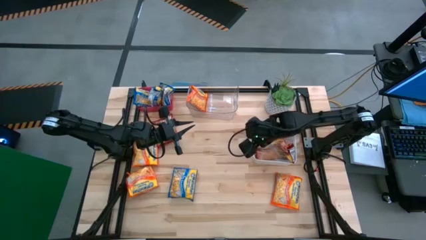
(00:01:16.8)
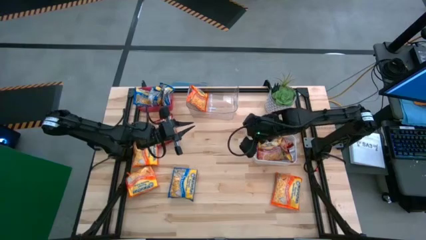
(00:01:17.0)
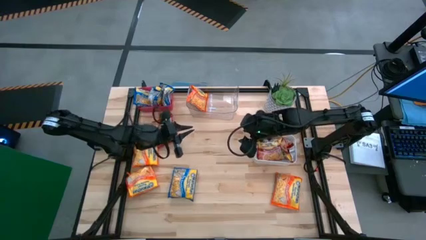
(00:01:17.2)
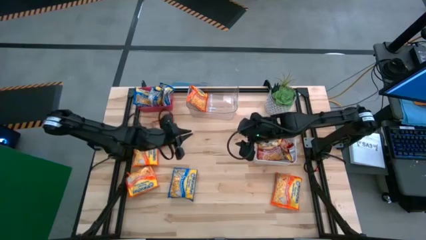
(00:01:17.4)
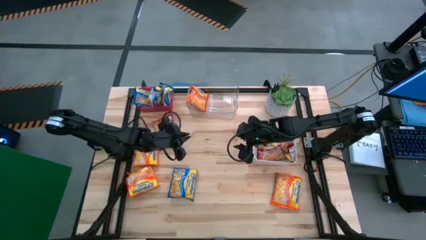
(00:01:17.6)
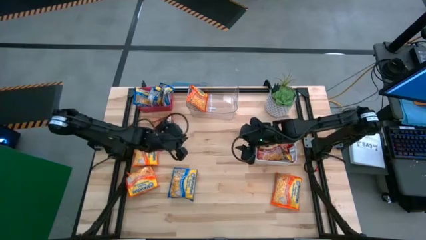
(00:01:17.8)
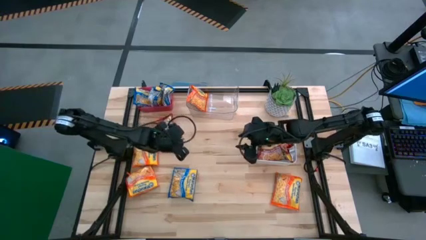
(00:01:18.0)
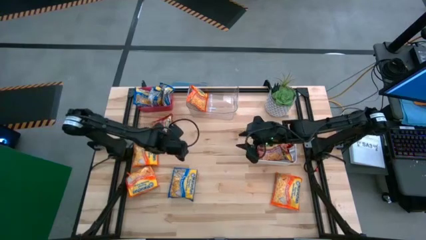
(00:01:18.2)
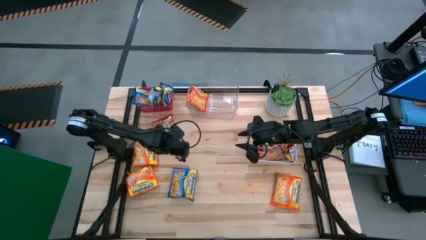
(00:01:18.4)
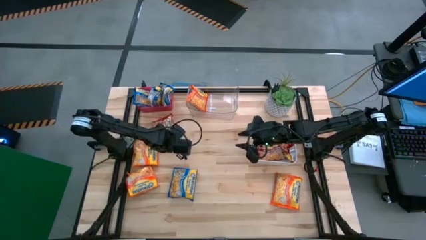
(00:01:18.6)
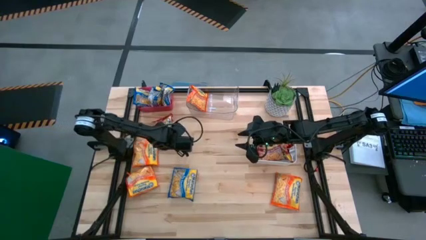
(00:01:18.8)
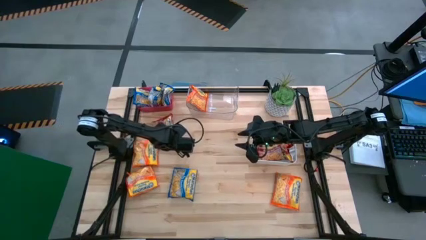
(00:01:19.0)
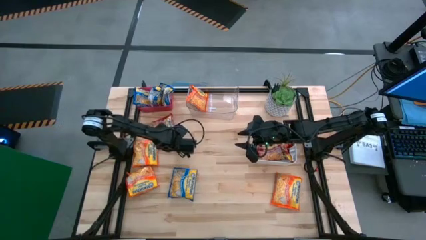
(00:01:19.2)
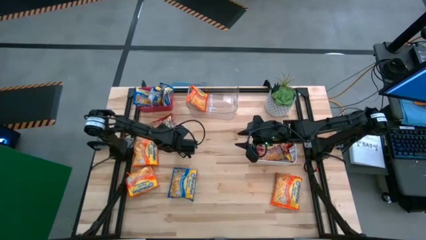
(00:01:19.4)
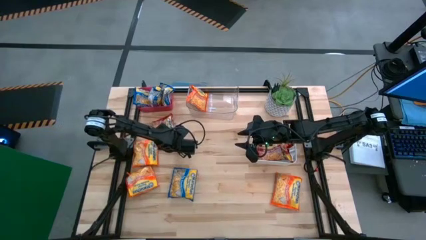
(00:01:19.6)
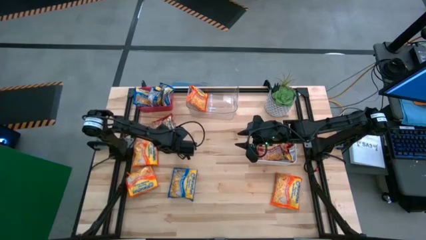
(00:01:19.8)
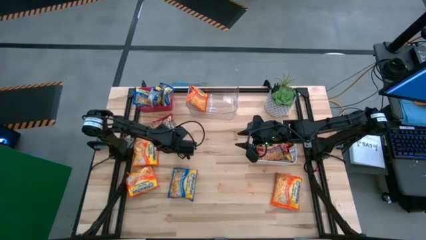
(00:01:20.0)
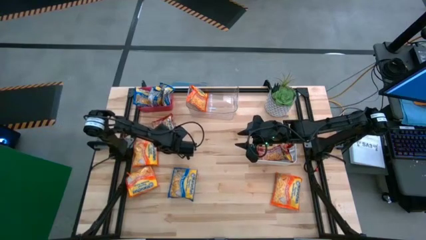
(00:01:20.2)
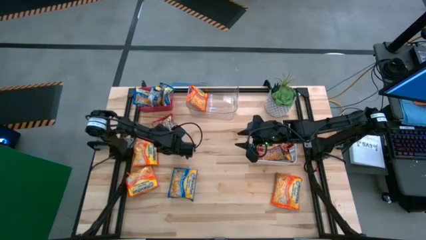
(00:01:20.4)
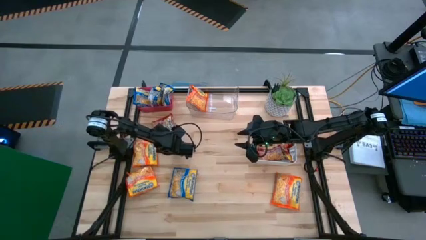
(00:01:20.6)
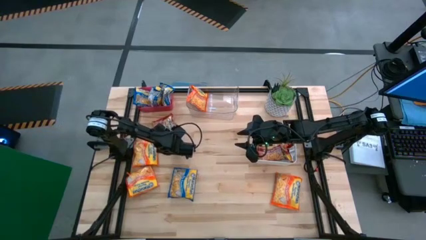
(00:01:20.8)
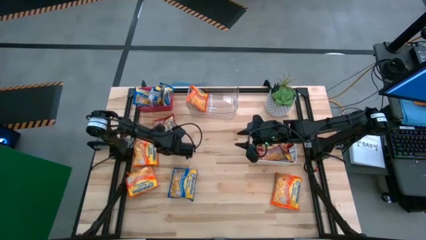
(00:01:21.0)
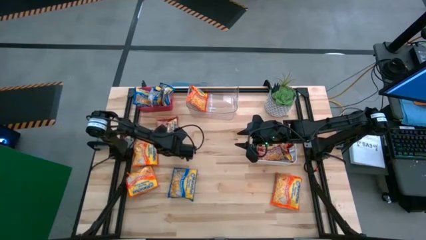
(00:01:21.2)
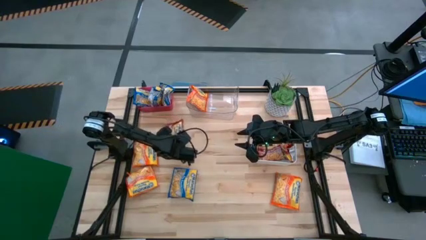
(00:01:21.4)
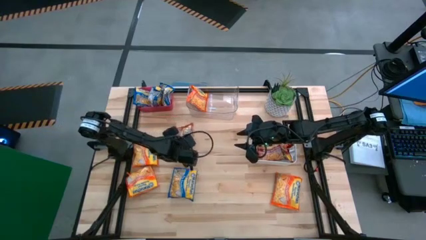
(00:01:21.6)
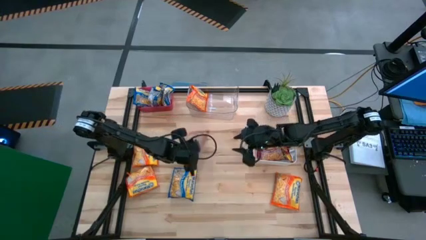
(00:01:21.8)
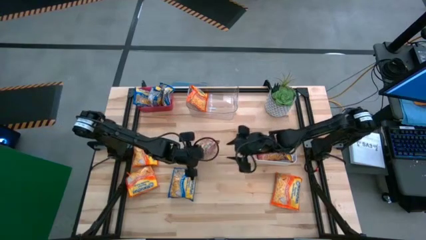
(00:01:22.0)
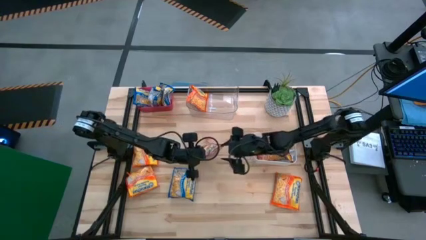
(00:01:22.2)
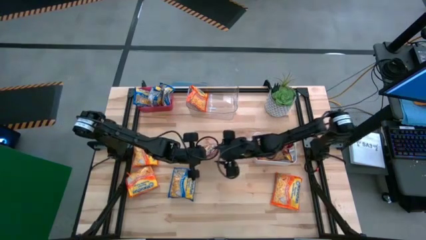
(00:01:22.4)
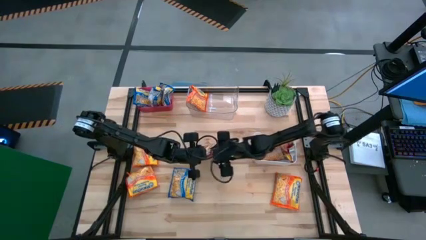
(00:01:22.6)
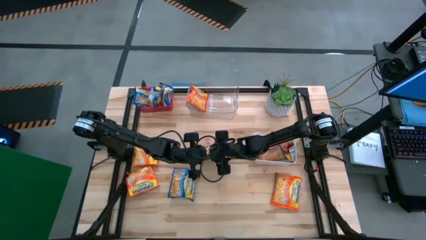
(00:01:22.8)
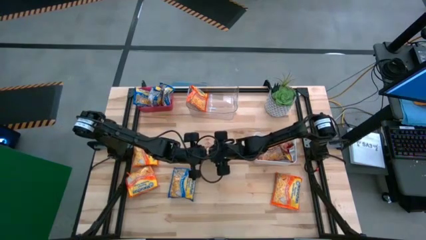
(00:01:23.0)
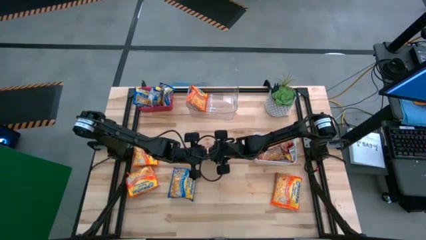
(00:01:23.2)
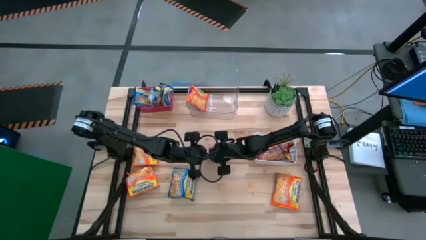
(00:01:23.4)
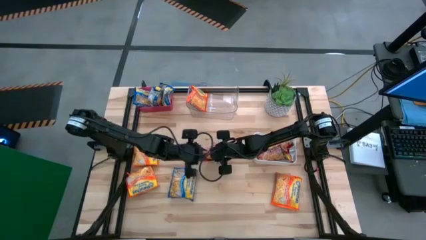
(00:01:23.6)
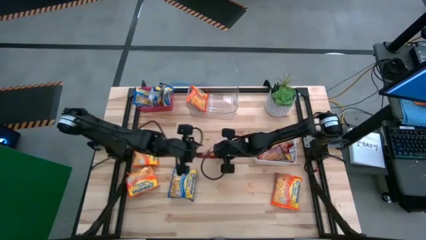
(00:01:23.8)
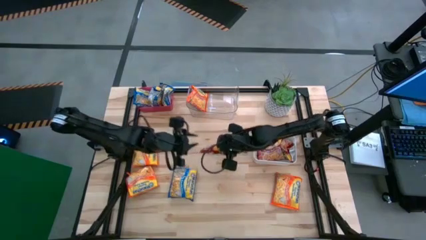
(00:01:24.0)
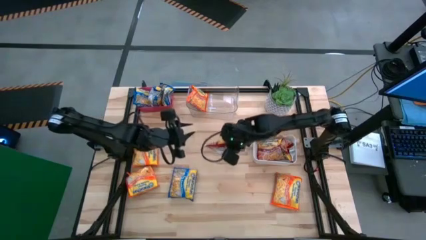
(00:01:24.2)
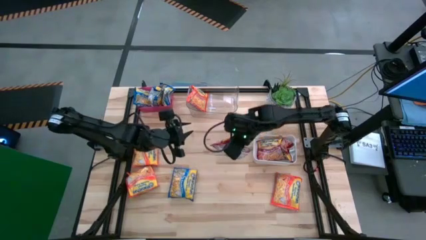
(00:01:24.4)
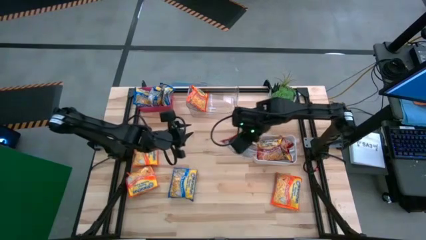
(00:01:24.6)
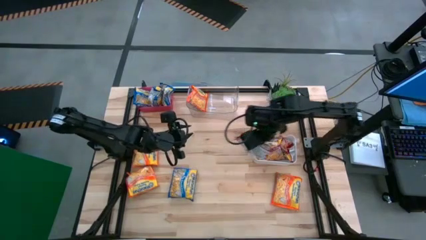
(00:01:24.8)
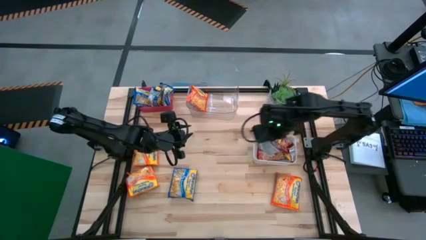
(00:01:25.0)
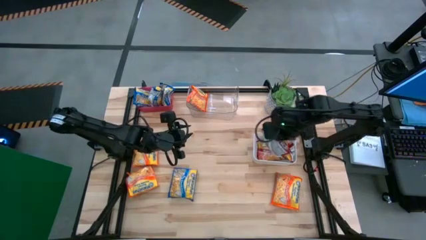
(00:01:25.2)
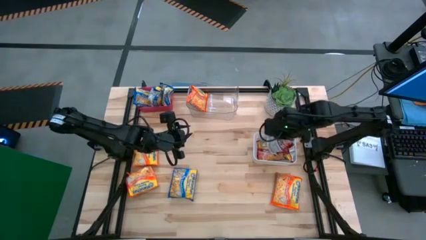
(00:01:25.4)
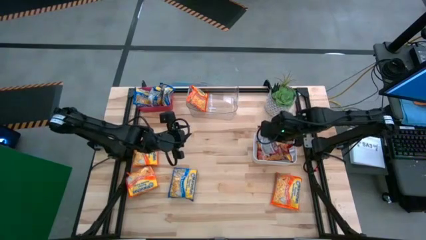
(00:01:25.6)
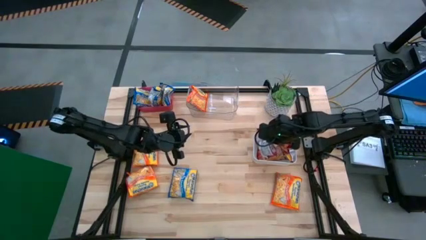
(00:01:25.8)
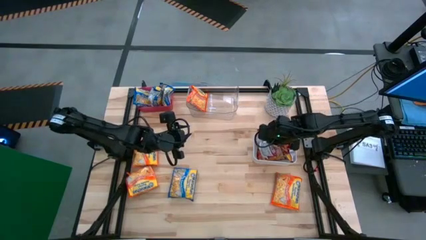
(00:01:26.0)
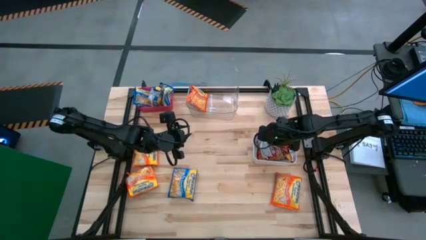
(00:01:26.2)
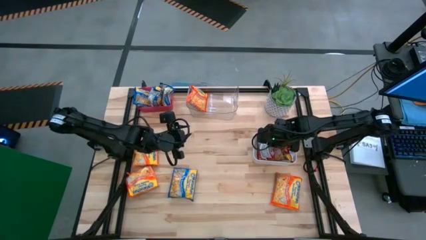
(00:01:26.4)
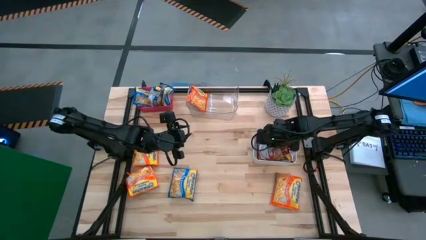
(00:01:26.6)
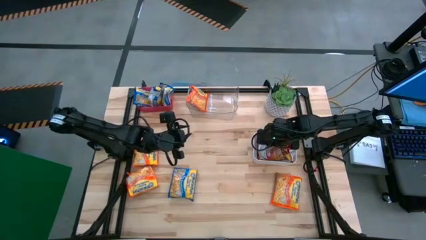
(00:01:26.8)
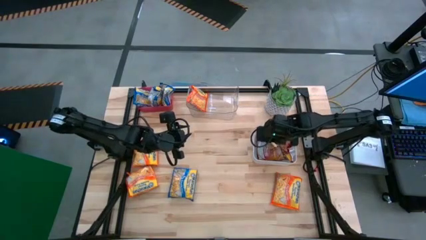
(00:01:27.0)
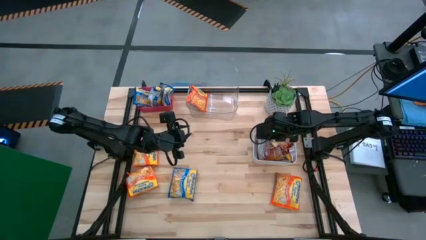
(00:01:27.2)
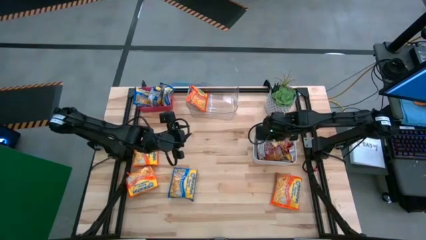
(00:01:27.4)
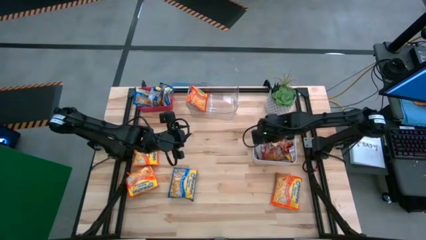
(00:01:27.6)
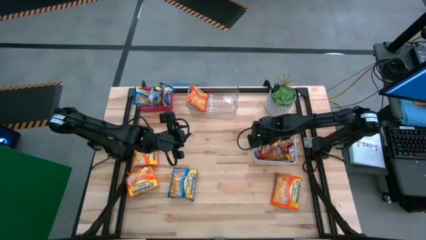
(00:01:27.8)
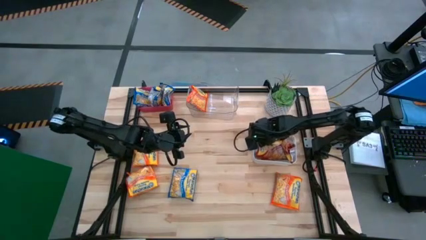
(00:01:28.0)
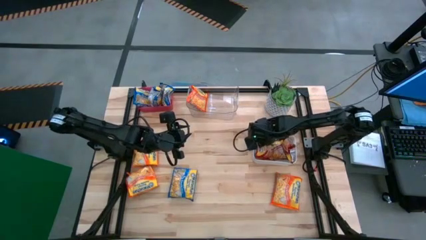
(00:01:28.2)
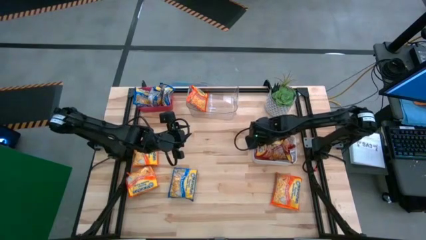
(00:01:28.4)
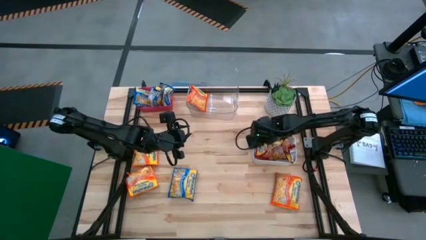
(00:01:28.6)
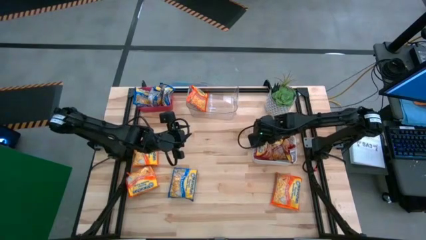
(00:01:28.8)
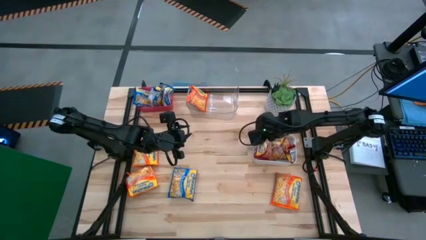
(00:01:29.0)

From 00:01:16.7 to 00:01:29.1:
Task: Sort Maruchan noodles
Put the red noodle pack into the white bin
